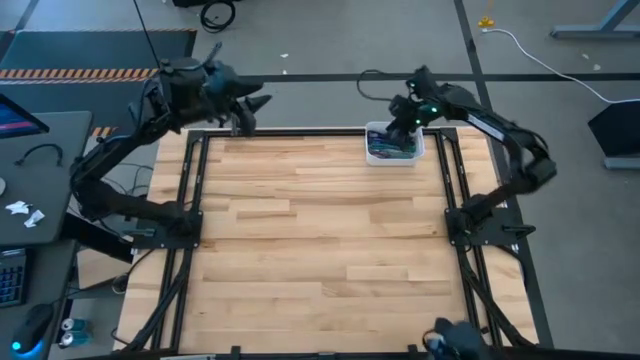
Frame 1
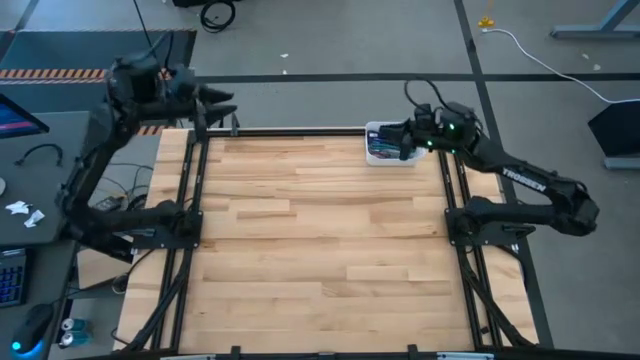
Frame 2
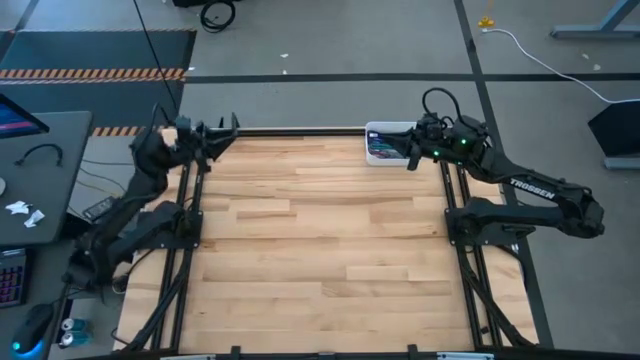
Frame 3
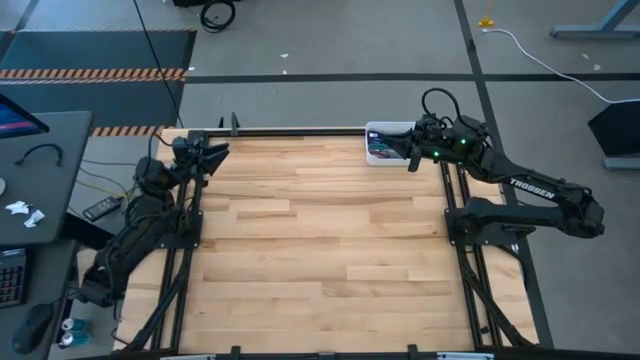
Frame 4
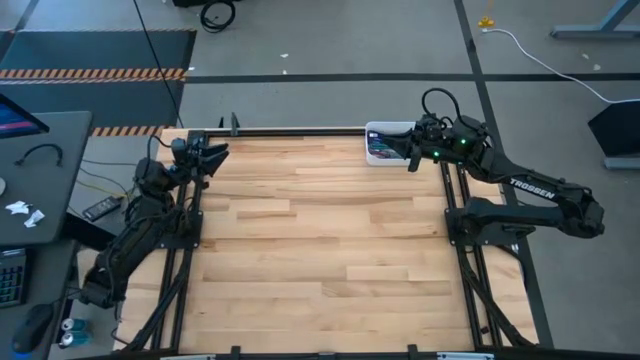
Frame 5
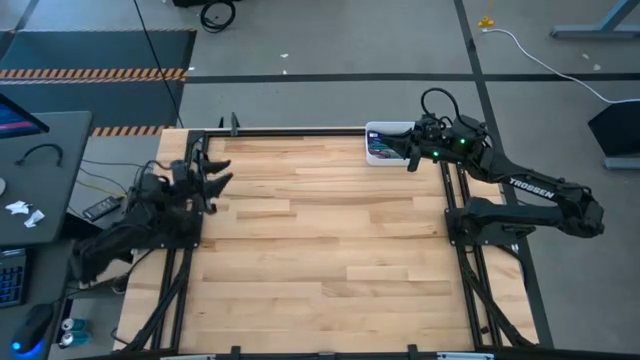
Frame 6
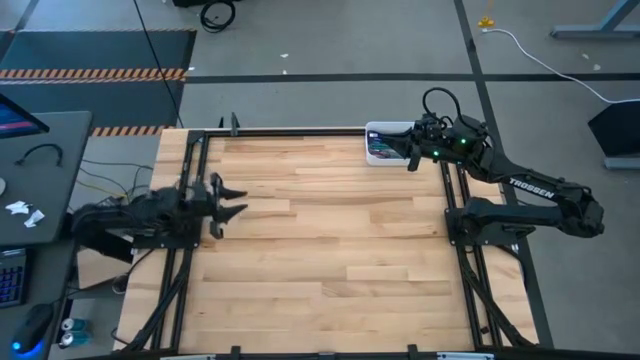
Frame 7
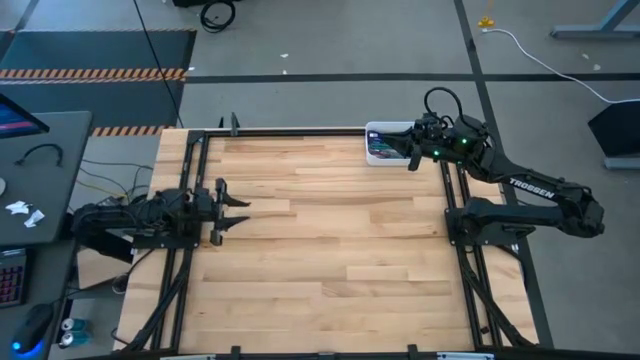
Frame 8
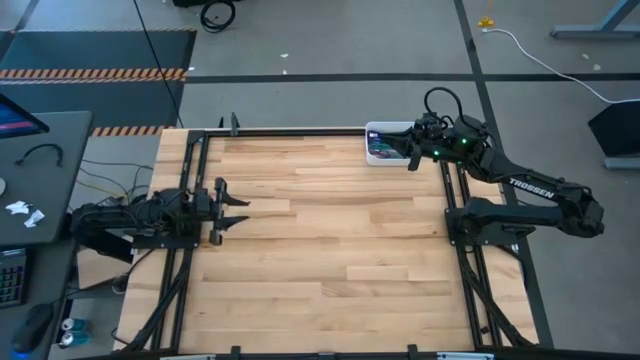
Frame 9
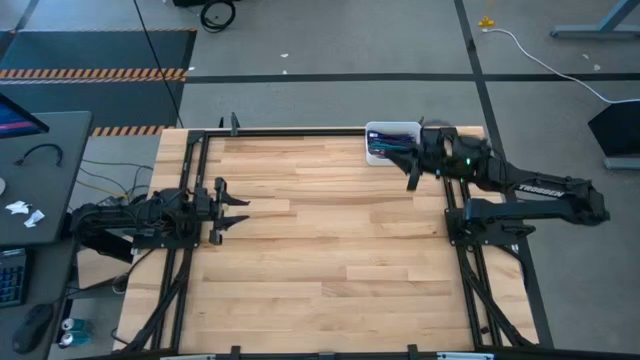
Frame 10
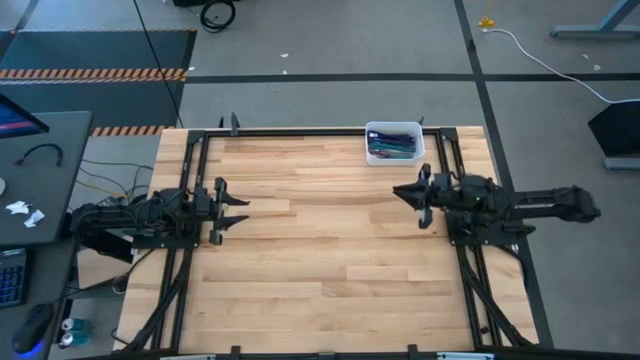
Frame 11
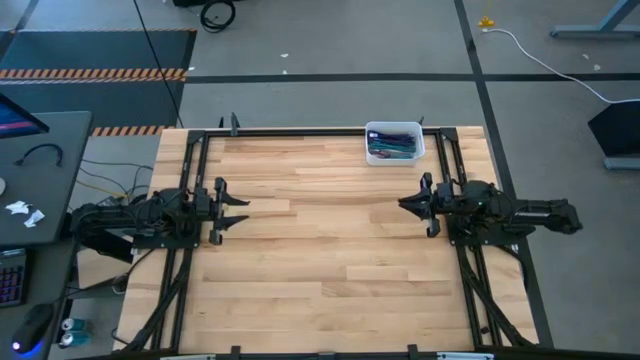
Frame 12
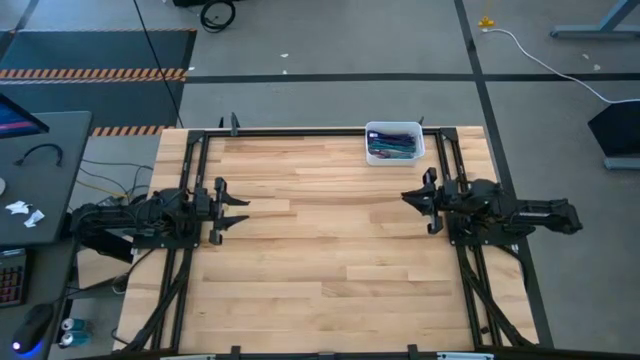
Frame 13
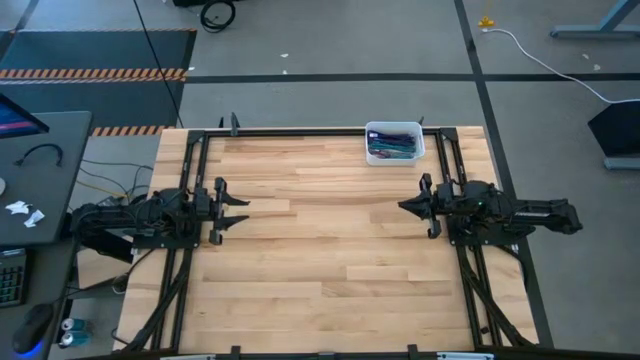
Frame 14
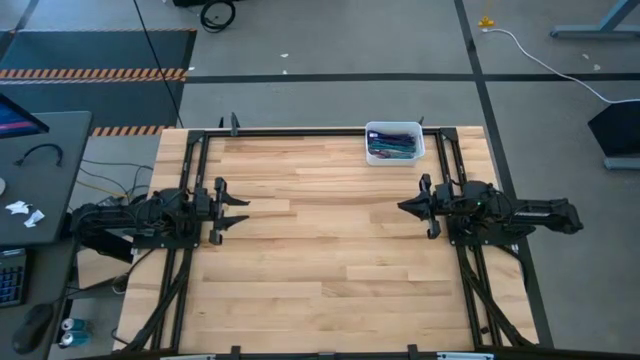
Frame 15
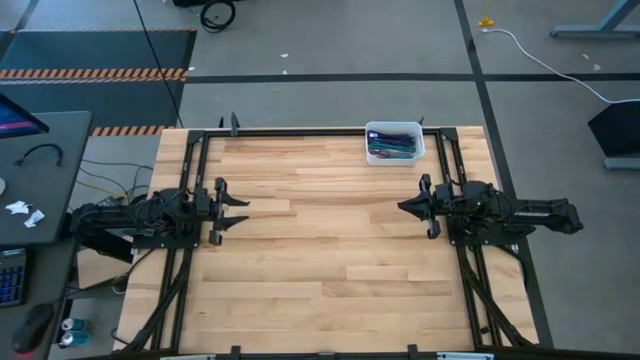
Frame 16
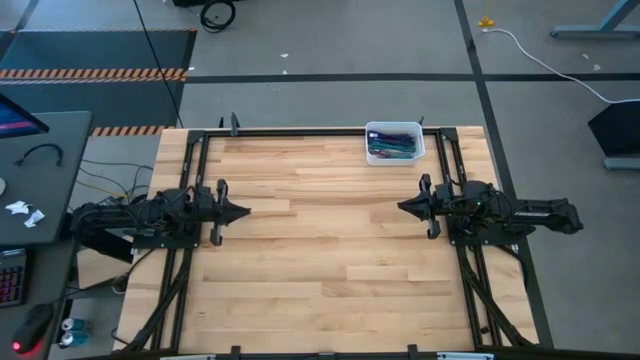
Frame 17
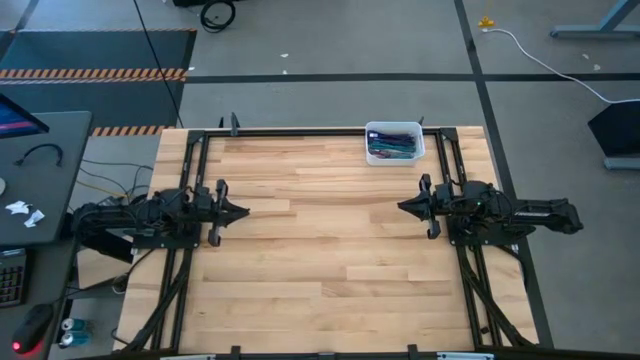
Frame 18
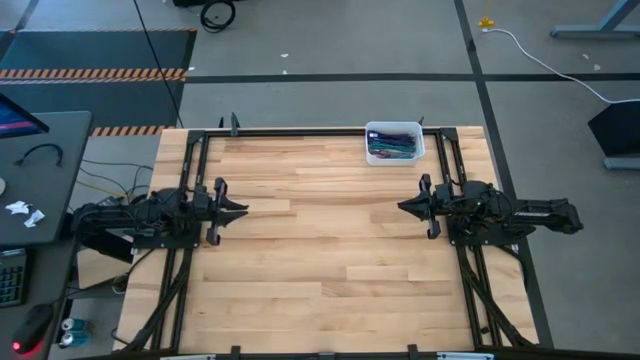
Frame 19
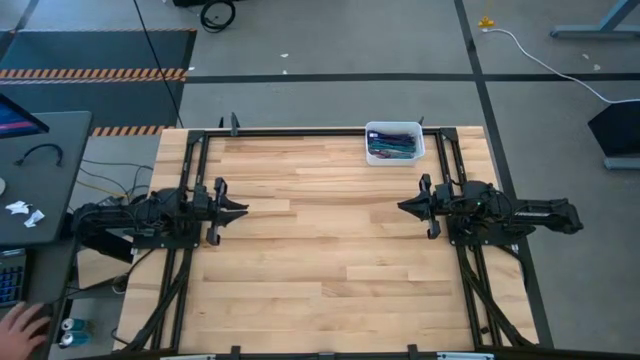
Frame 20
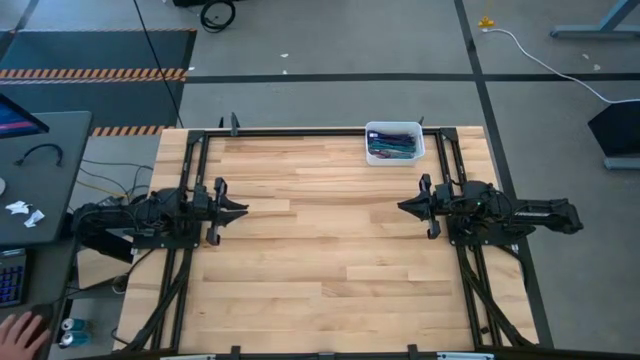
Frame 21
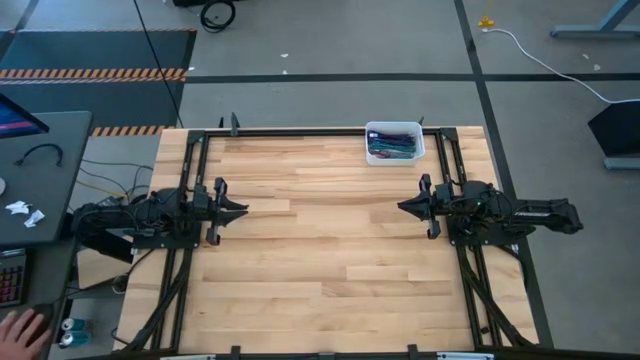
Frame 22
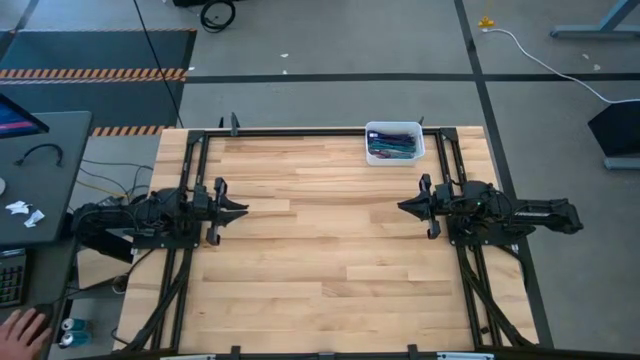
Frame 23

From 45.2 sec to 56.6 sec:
Task: Pick and place USB-C Cables
Return to Home Position

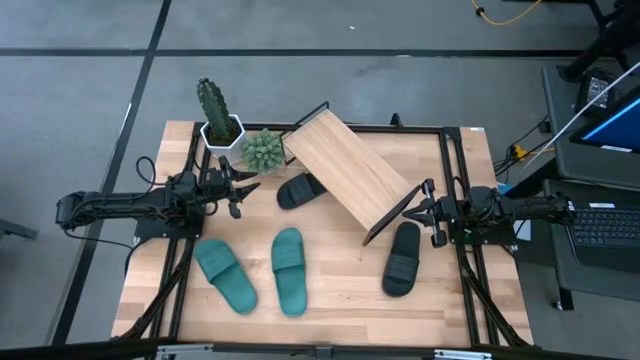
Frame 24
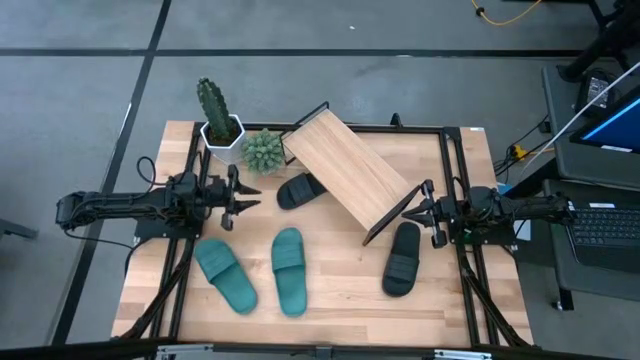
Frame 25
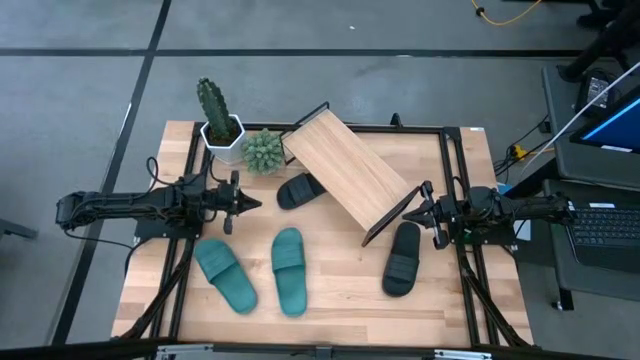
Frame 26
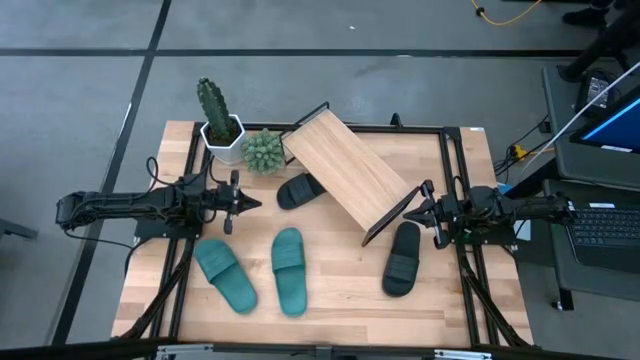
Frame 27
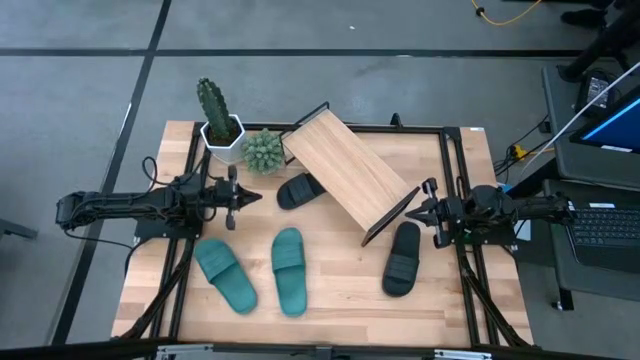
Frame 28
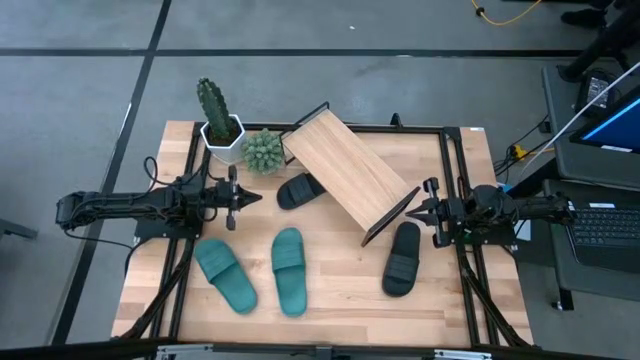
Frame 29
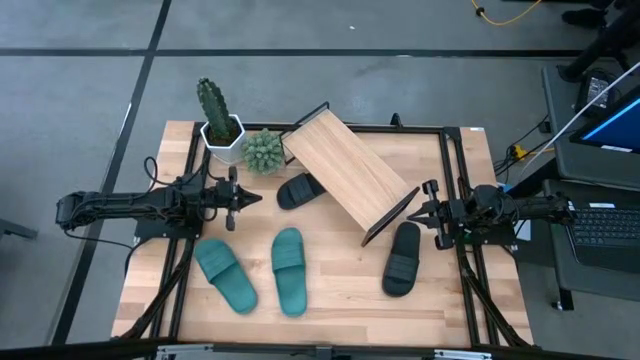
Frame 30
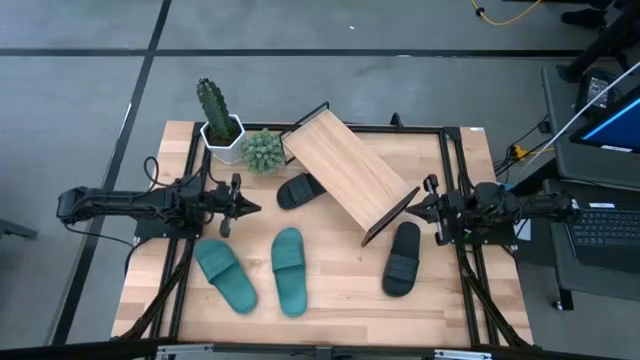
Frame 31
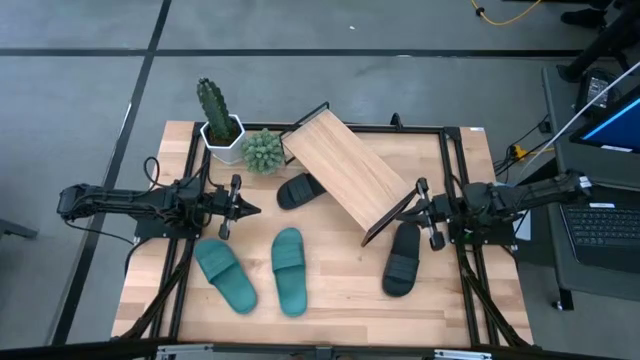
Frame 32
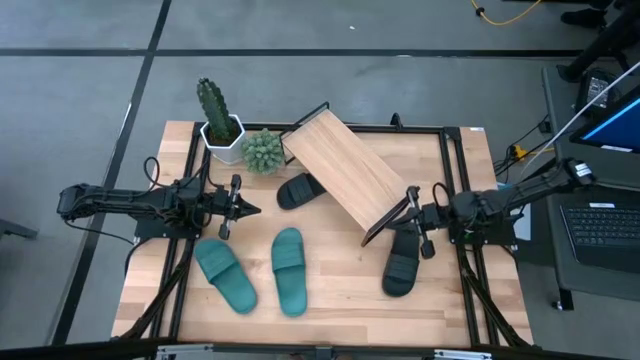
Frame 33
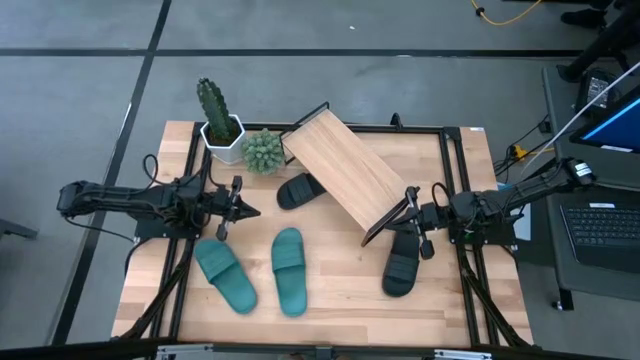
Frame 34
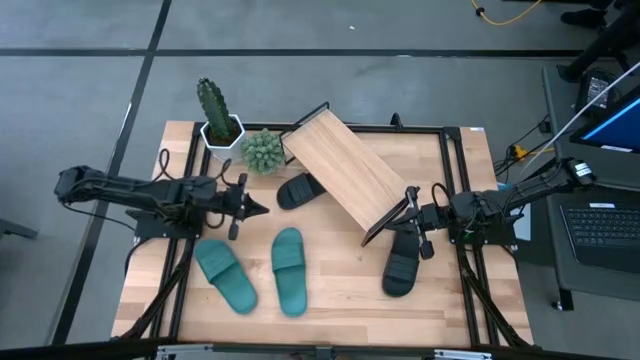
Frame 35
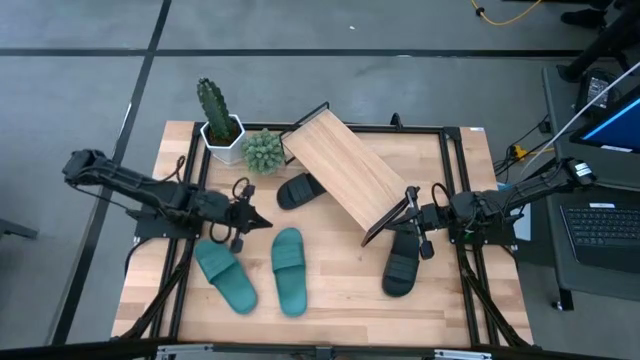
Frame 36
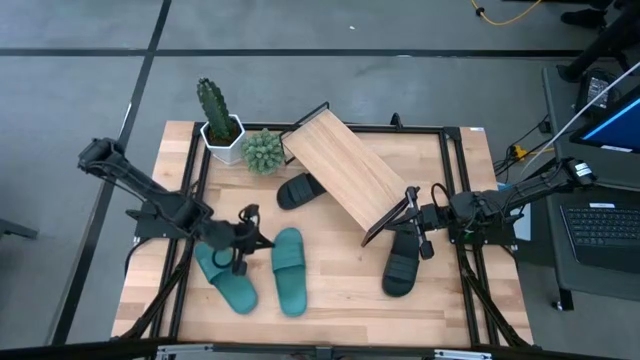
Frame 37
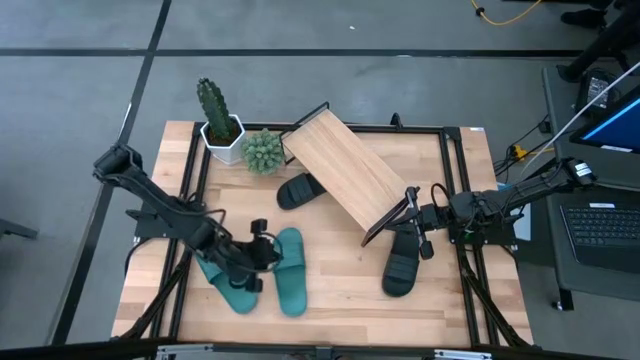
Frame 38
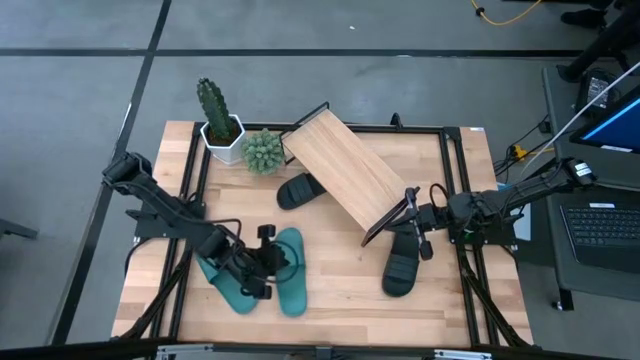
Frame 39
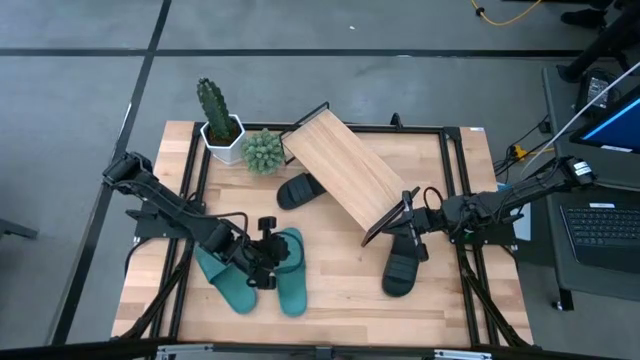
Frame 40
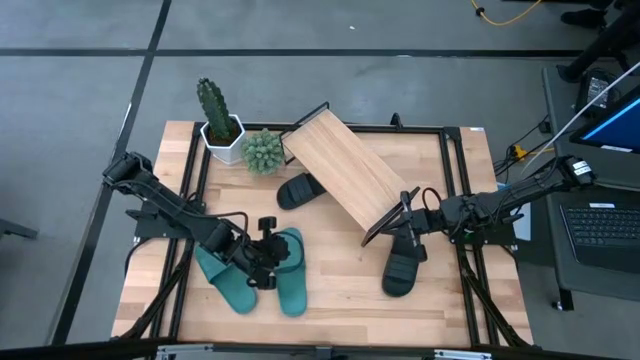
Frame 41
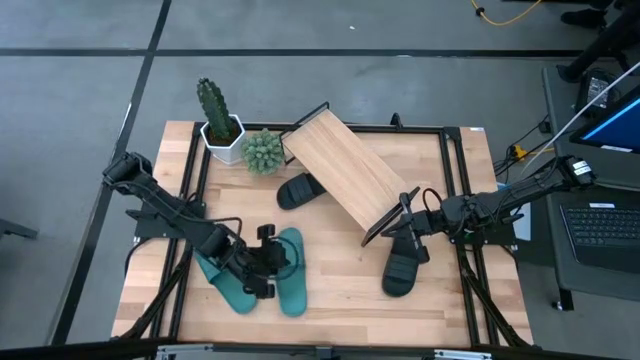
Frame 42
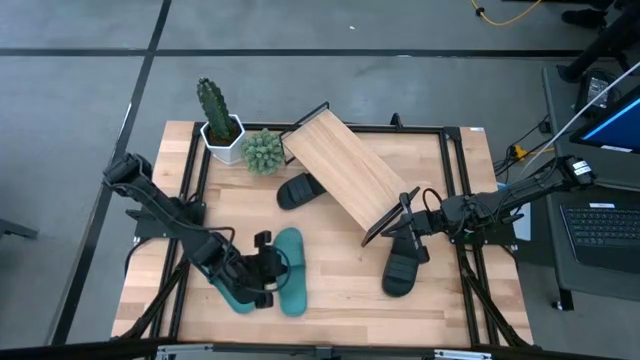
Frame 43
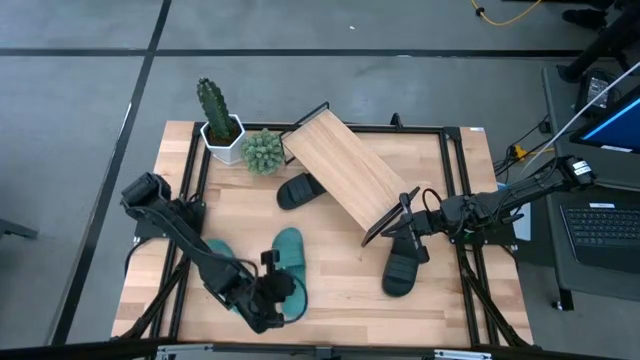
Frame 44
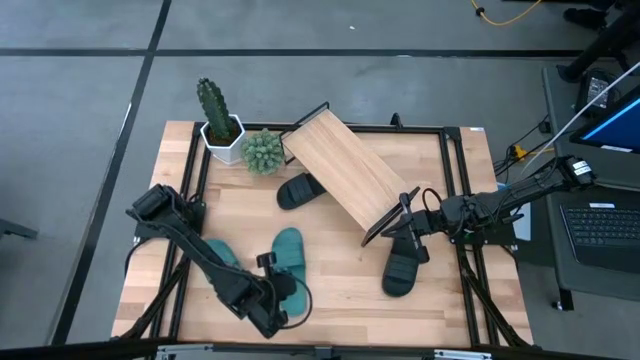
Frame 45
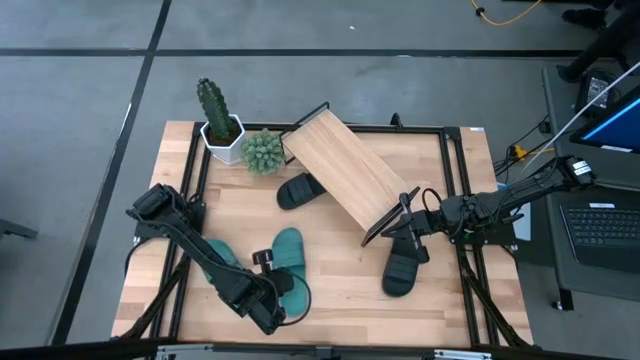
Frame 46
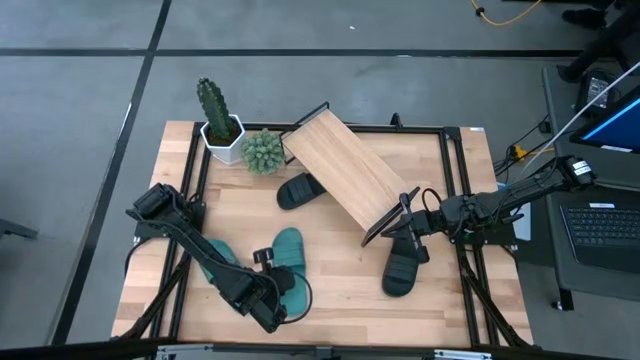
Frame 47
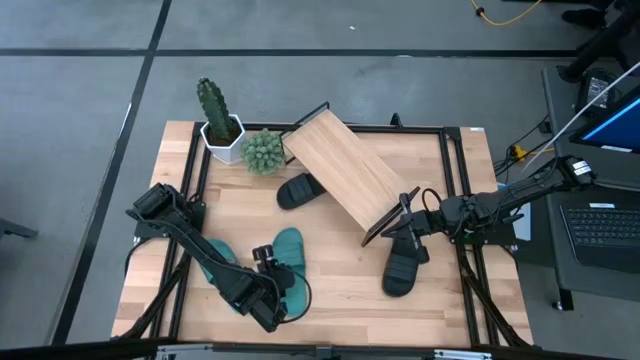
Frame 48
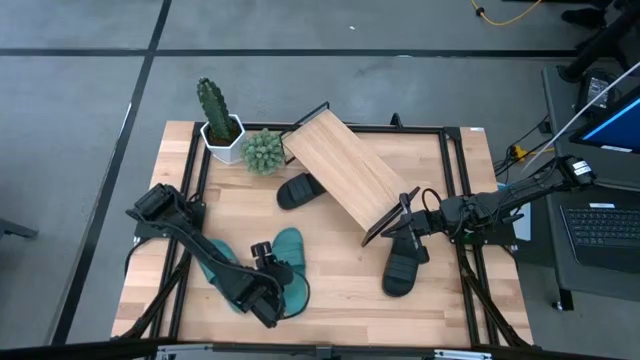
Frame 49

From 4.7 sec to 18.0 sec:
Task: Pick and place slides into the shelf
Put the right green slides on the shelf
